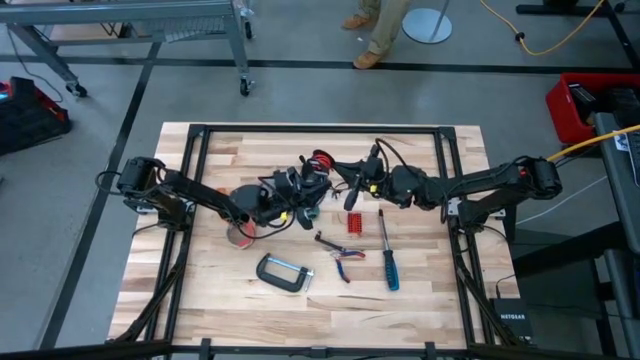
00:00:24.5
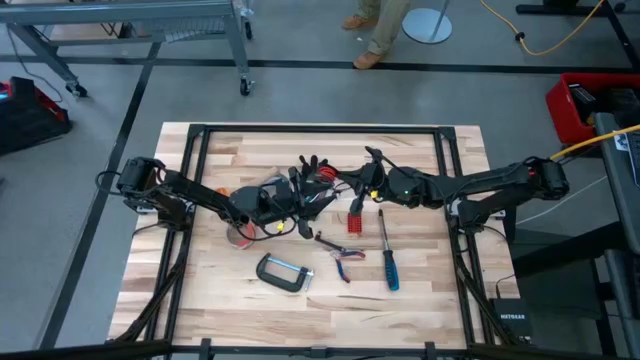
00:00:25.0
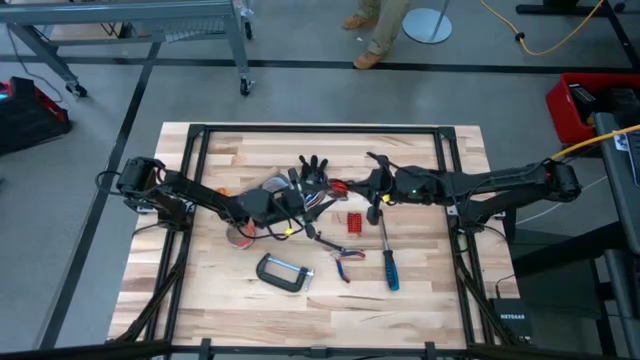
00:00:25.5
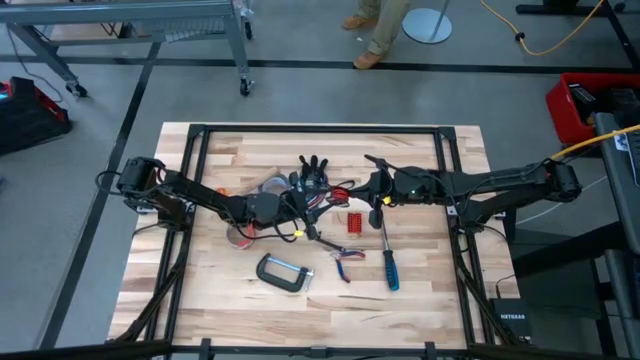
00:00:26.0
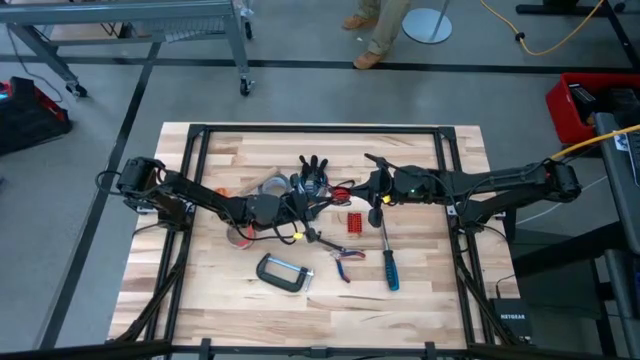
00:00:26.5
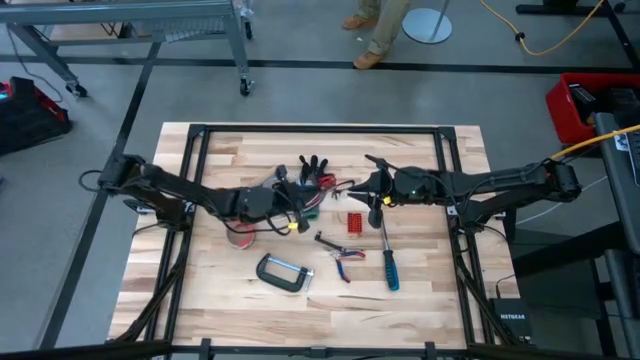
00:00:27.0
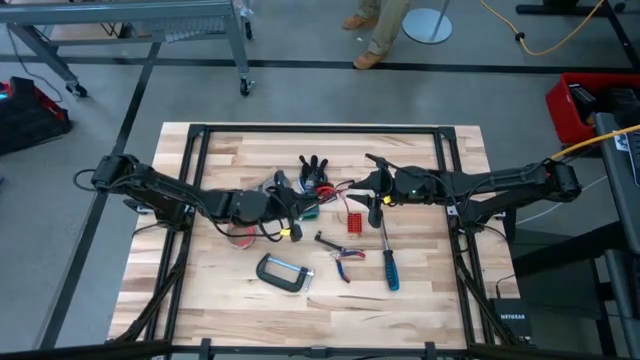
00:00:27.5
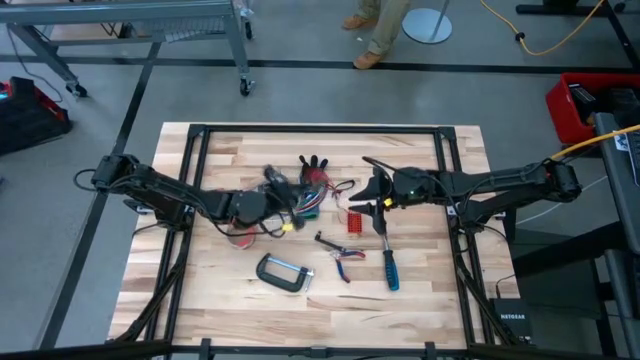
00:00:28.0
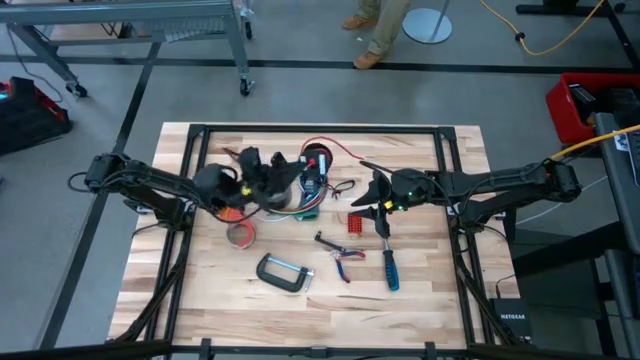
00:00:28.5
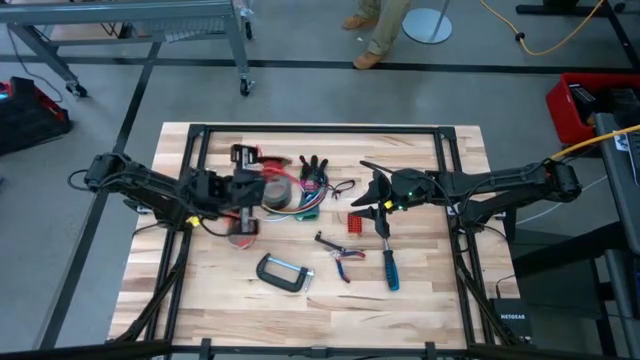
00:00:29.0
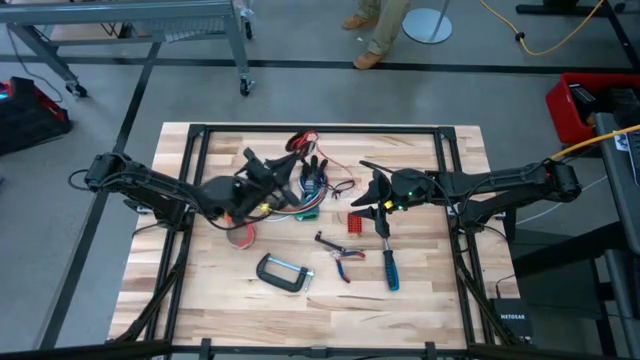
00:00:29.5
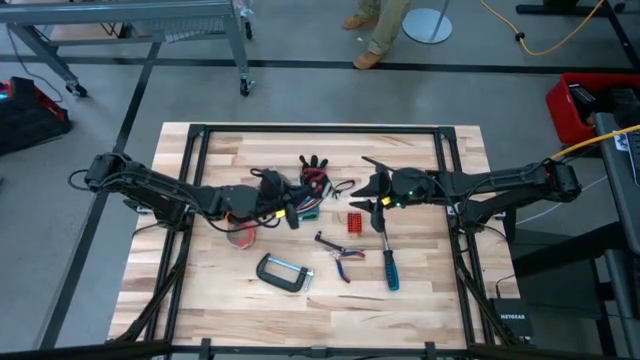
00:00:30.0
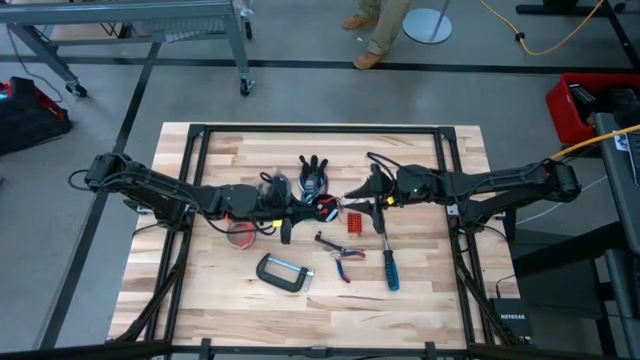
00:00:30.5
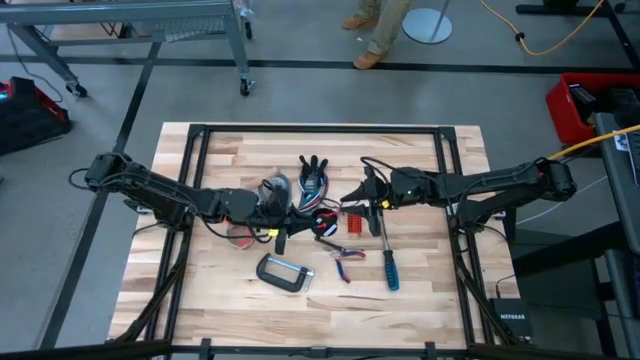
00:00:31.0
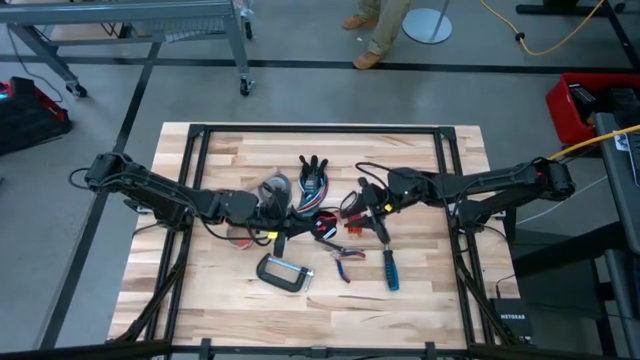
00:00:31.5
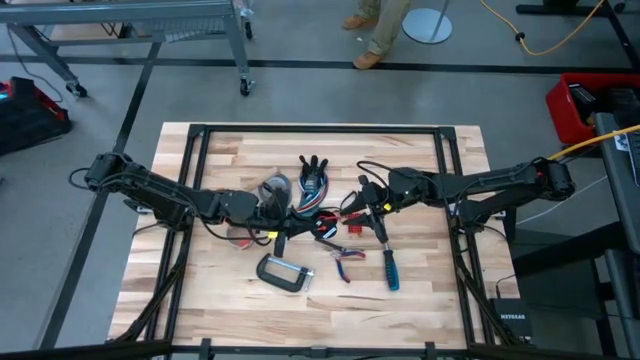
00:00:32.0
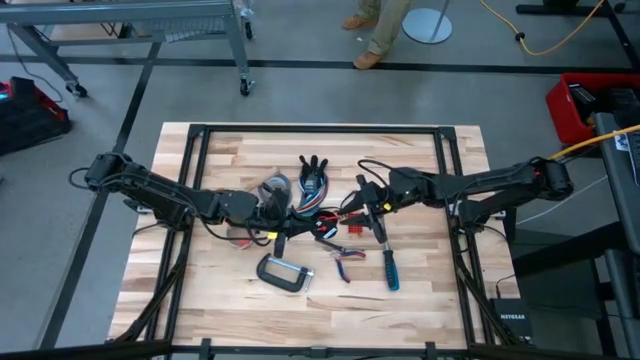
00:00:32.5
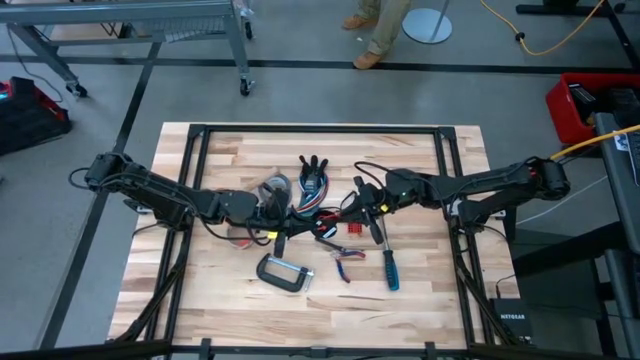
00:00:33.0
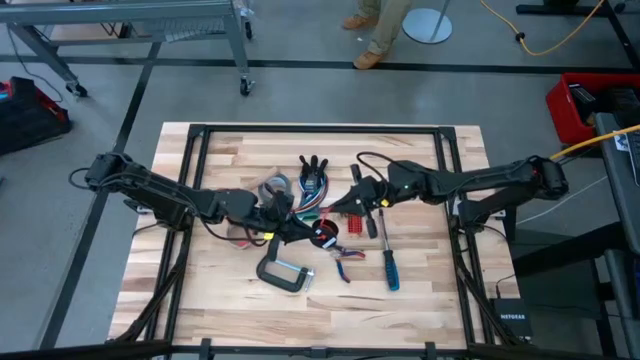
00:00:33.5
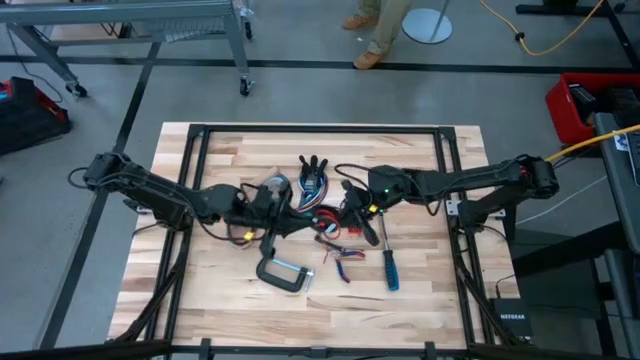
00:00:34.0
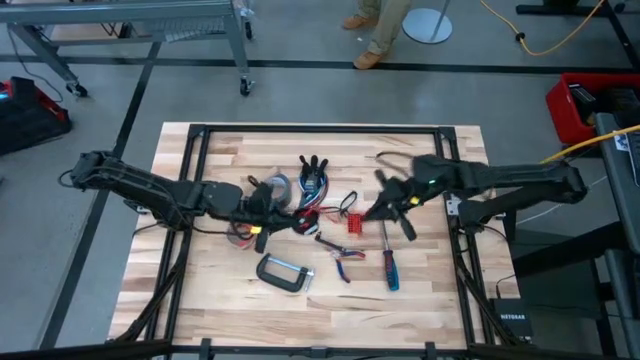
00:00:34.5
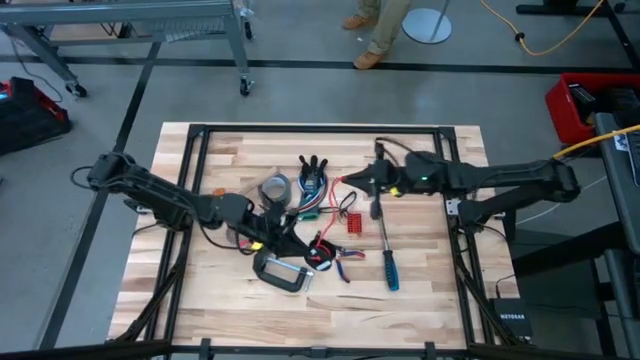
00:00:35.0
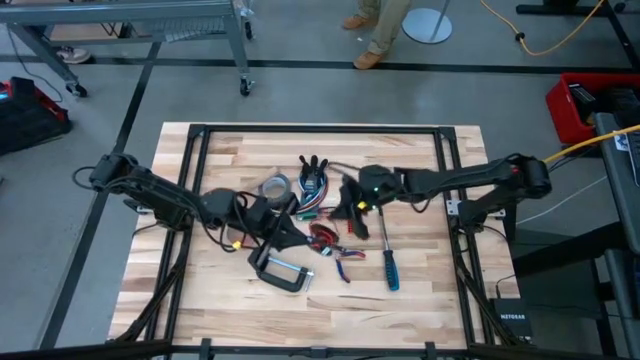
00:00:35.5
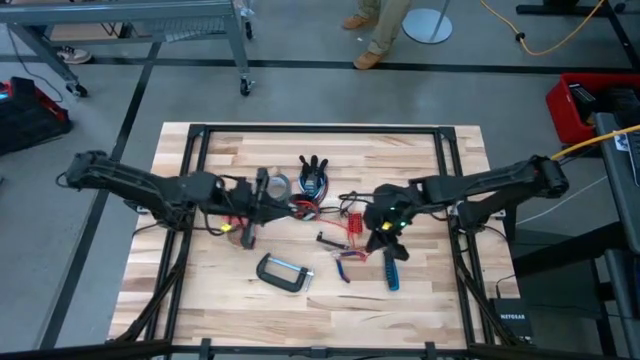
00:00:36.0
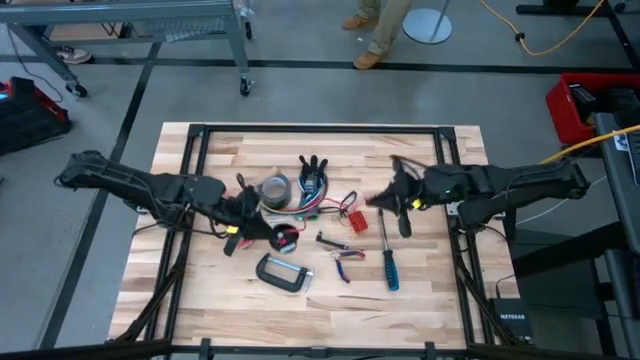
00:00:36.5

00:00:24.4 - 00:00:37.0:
Task: Coil cords
Uncoil the red wire from the black spool

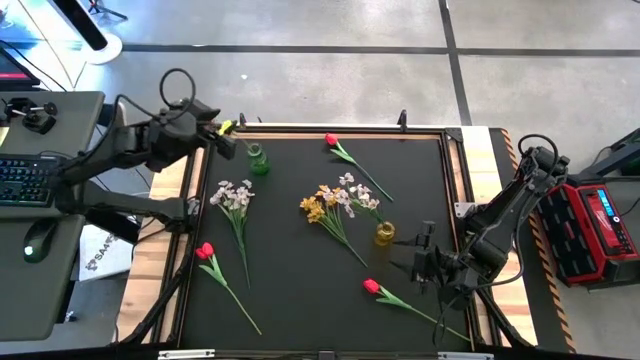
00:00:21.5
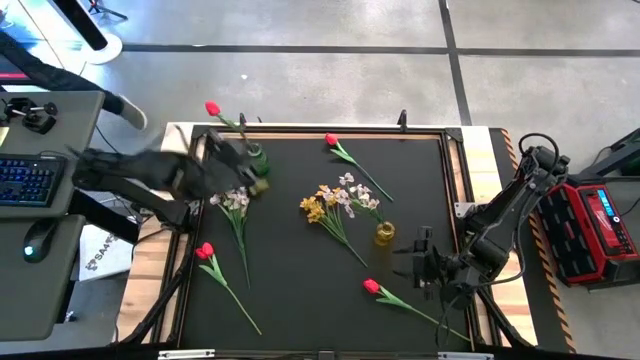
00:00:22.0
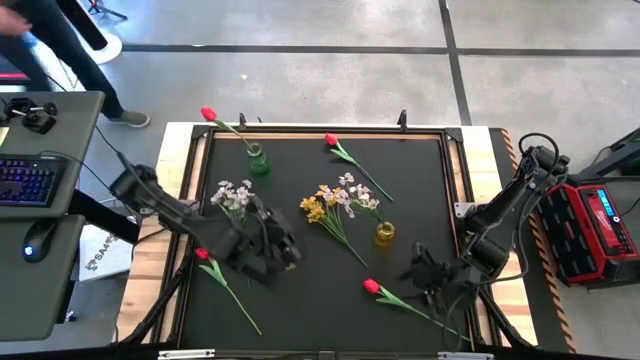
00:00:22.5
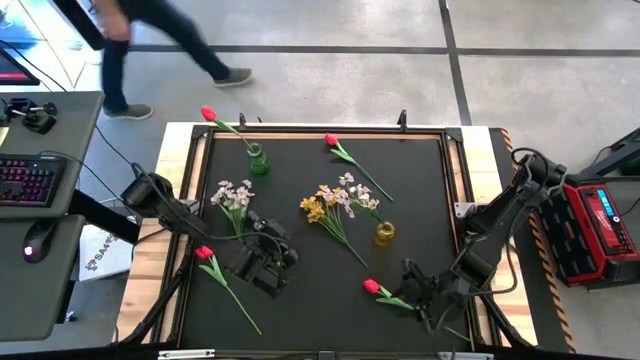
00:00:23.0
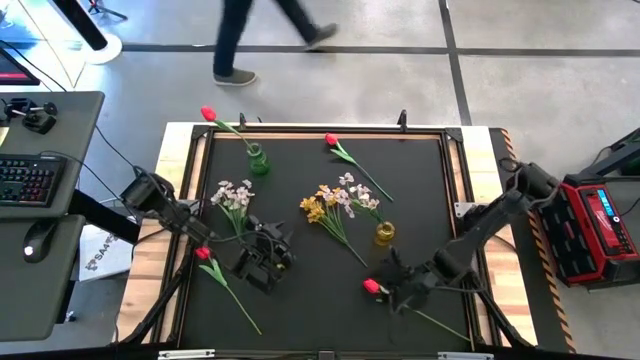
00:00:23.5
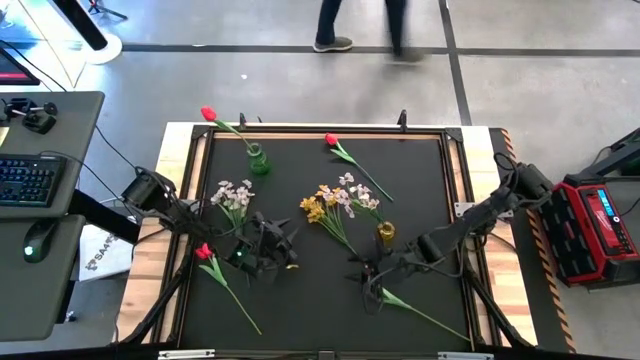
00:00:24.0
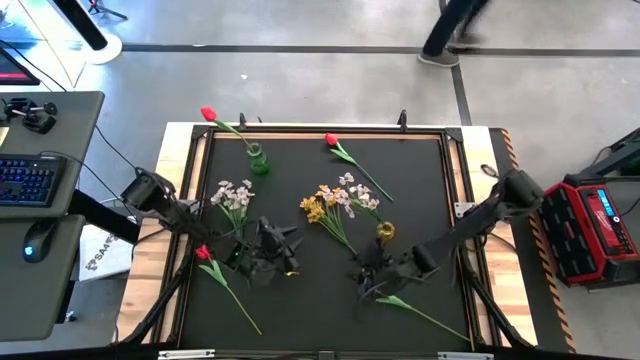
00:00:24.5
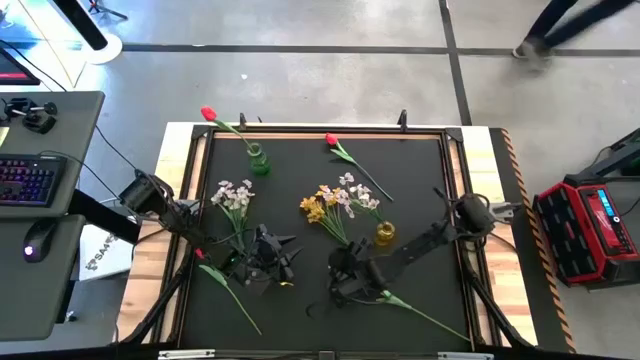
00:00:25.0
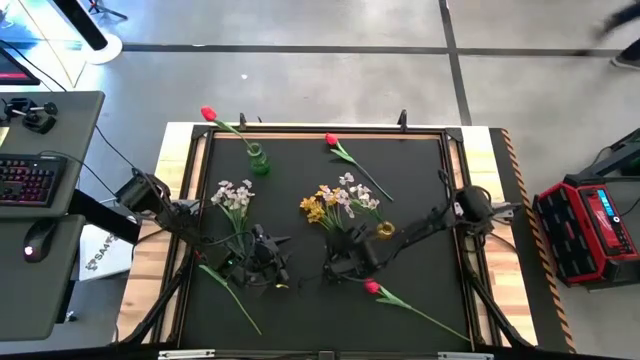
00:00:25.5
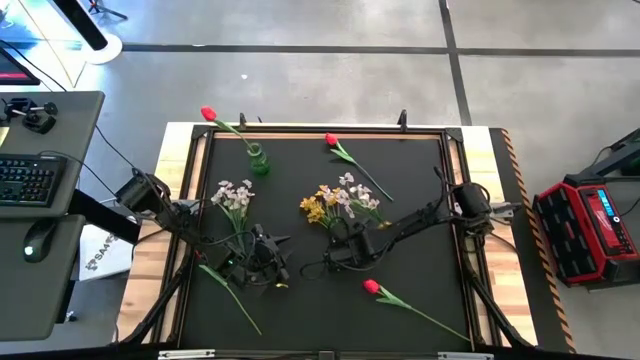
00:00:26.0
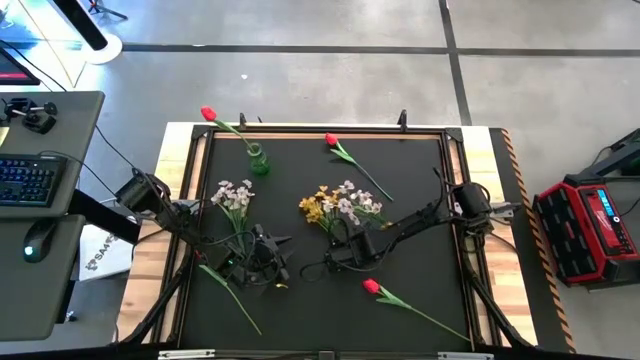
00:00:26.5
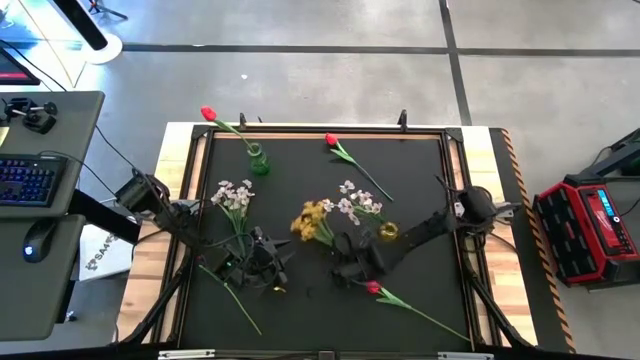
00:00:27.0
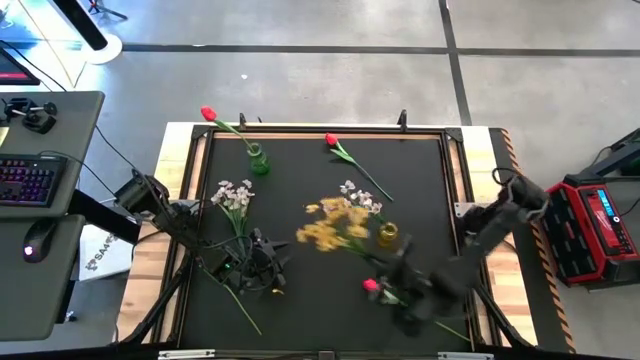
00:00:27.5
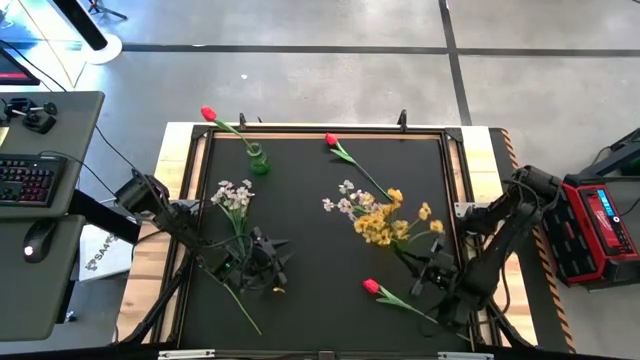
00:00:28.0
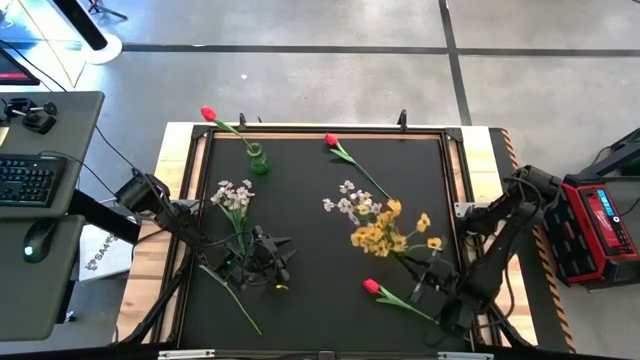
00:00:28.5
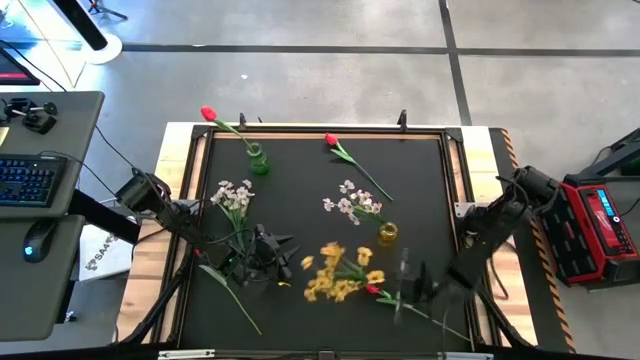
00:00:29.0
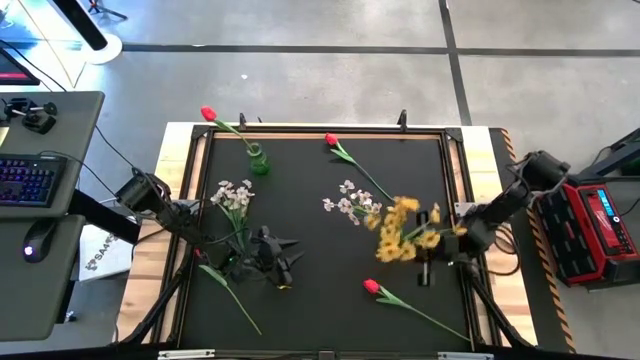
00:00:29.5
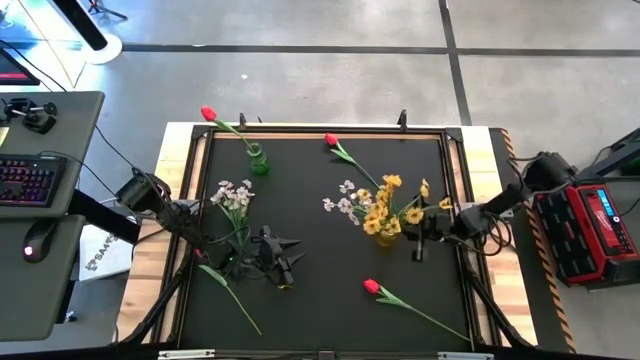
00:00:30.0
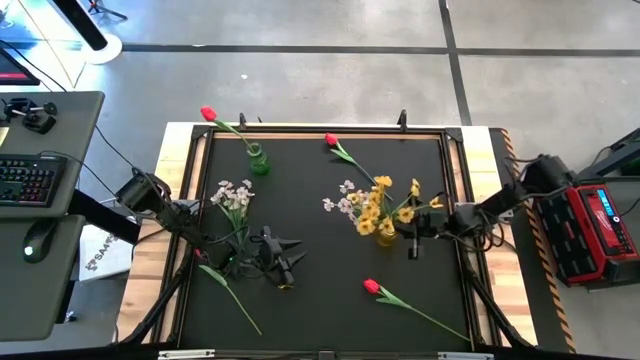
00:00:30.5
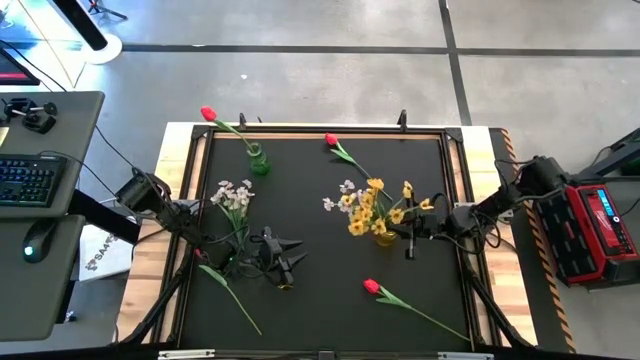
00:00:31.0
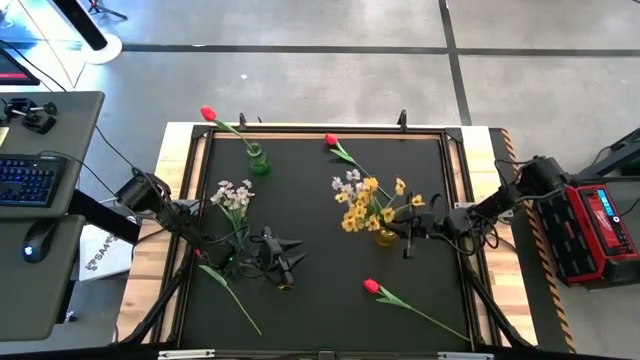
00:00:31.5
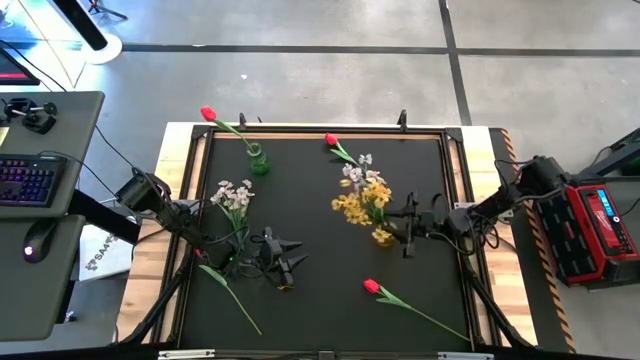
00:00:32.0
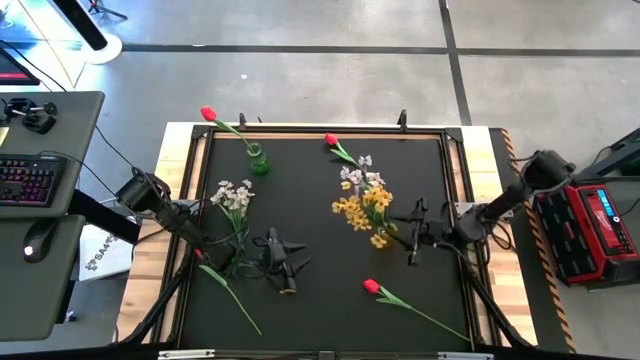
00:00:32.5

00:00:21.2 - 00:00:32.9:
Task: Sort flowers into vase by color
Put the yellow flowers in the yellow vase
